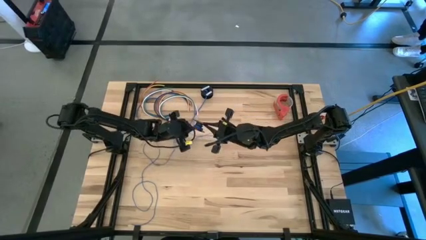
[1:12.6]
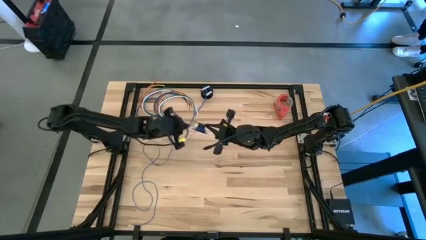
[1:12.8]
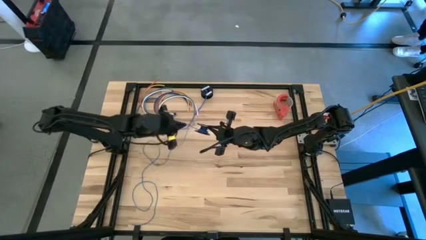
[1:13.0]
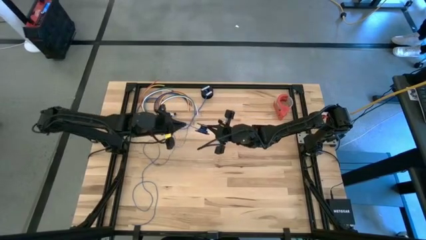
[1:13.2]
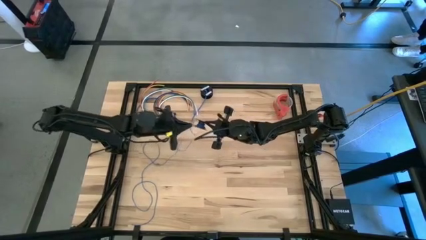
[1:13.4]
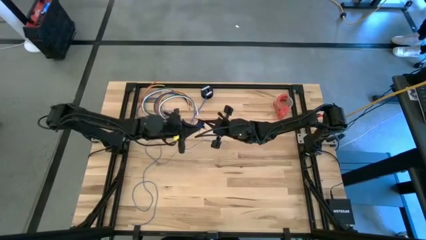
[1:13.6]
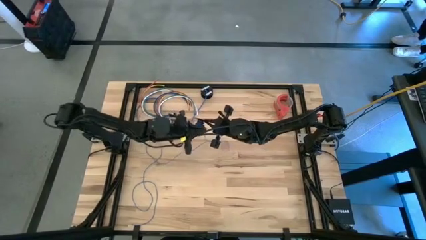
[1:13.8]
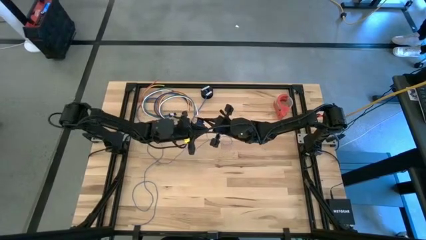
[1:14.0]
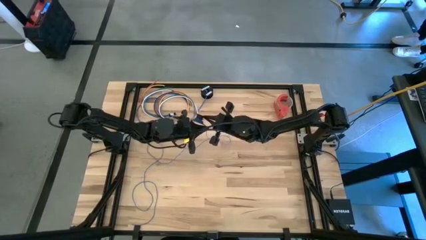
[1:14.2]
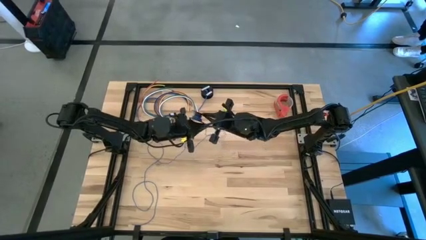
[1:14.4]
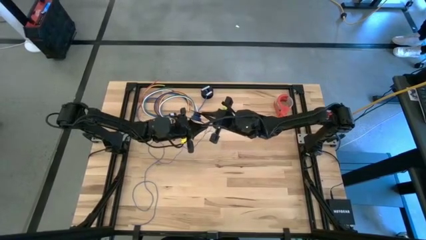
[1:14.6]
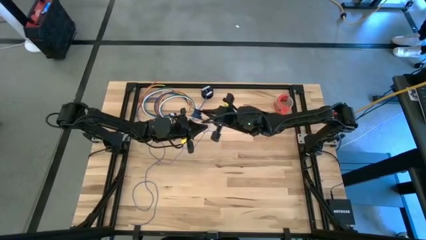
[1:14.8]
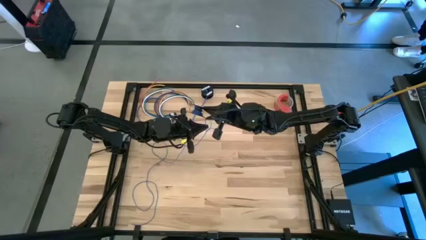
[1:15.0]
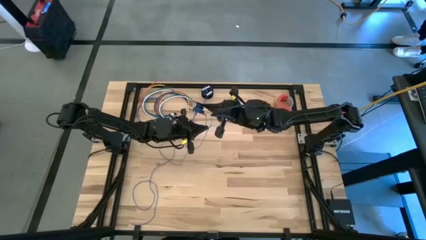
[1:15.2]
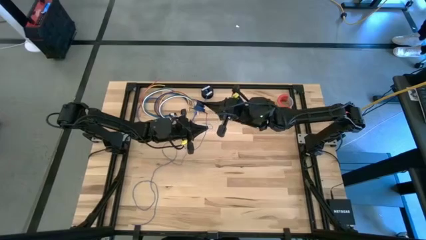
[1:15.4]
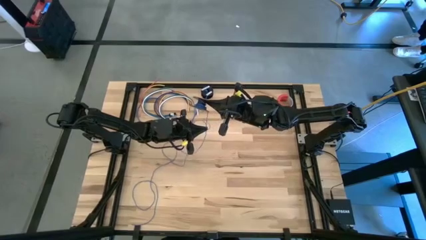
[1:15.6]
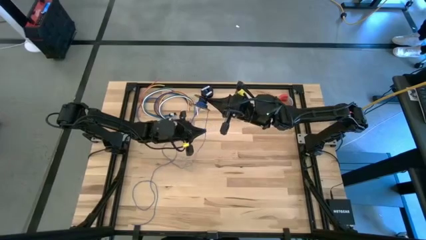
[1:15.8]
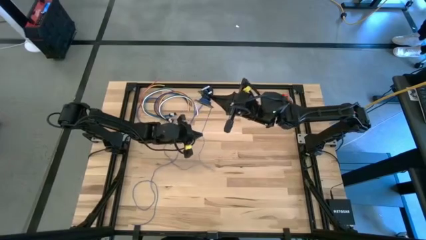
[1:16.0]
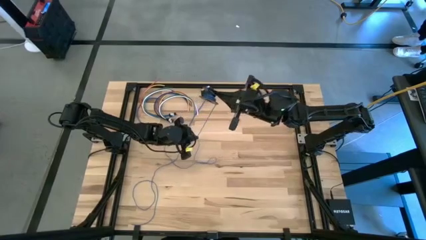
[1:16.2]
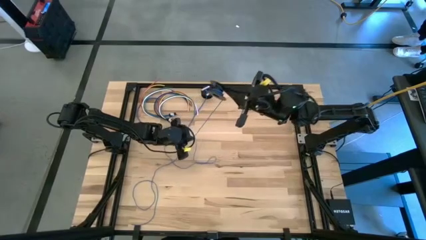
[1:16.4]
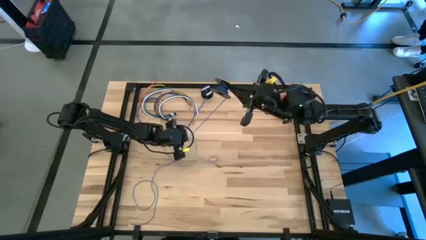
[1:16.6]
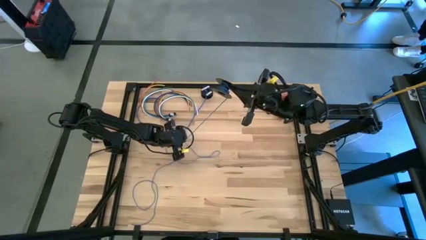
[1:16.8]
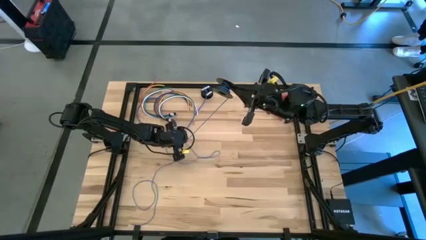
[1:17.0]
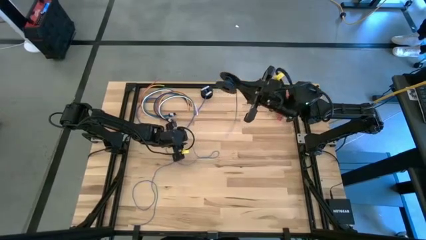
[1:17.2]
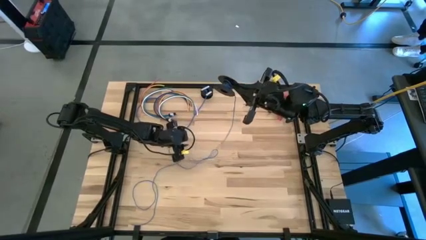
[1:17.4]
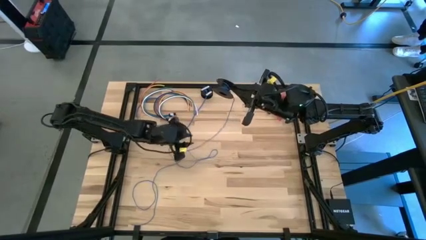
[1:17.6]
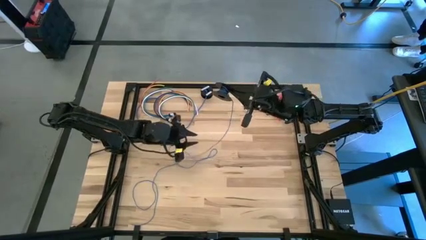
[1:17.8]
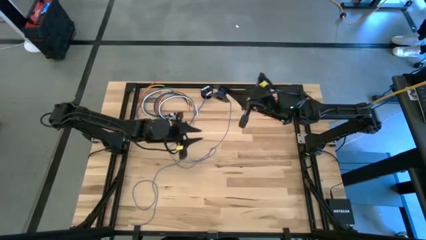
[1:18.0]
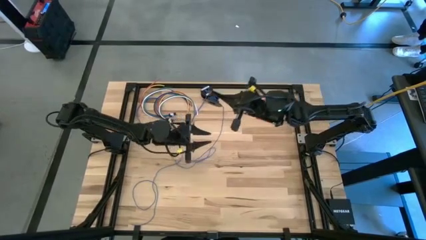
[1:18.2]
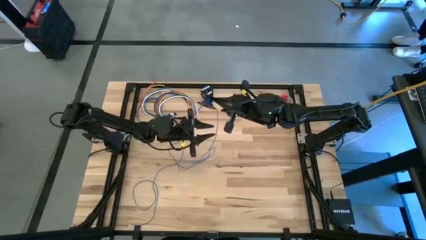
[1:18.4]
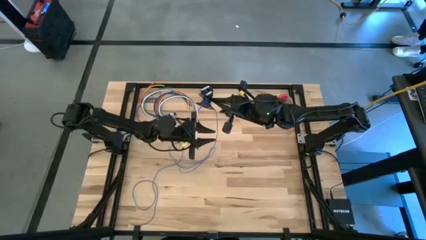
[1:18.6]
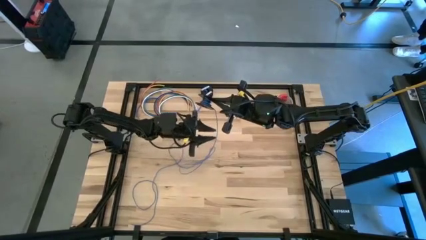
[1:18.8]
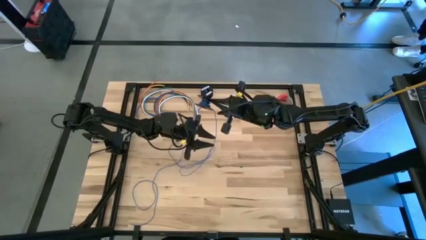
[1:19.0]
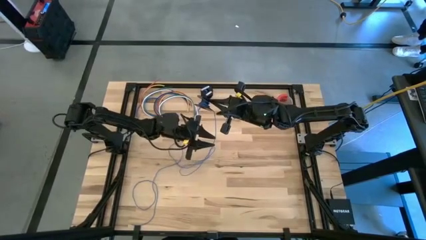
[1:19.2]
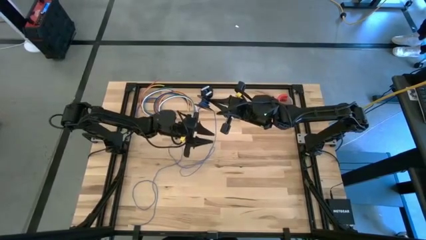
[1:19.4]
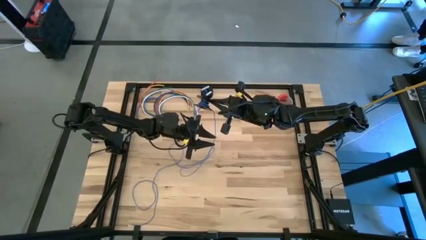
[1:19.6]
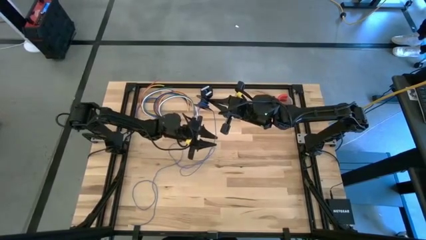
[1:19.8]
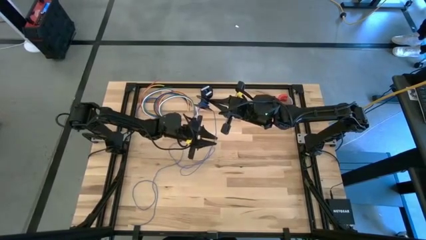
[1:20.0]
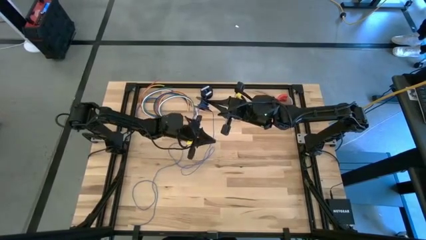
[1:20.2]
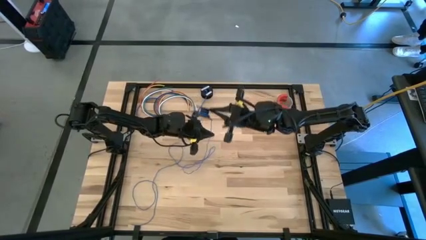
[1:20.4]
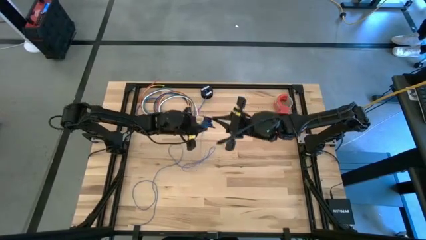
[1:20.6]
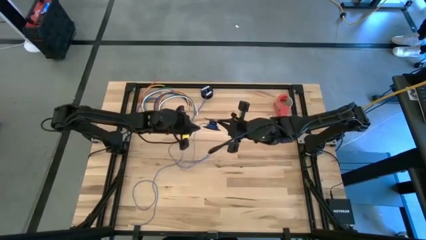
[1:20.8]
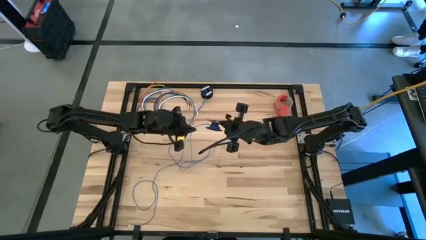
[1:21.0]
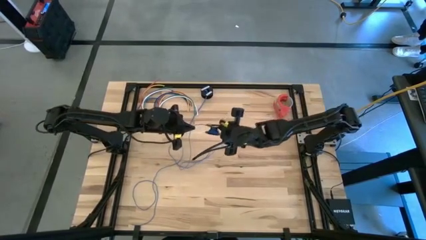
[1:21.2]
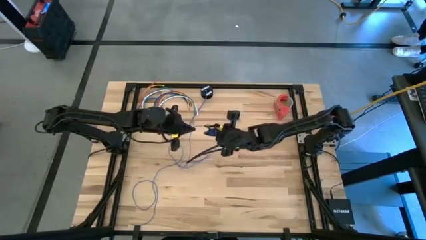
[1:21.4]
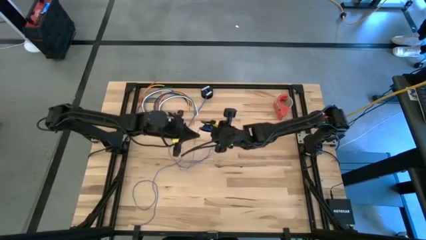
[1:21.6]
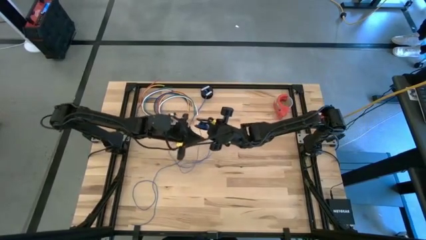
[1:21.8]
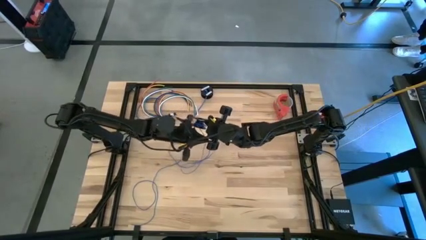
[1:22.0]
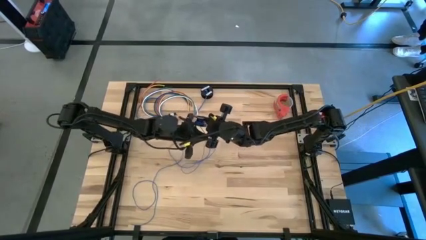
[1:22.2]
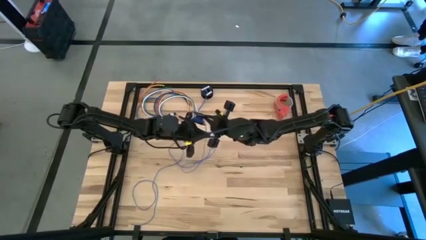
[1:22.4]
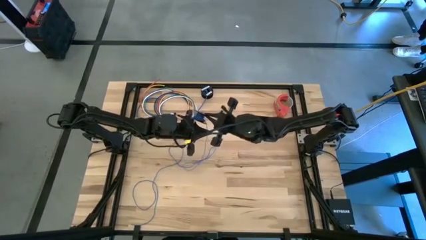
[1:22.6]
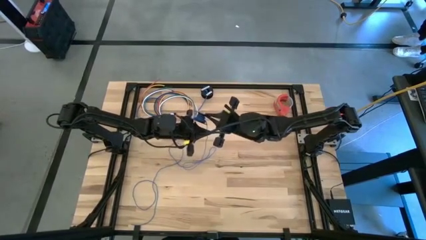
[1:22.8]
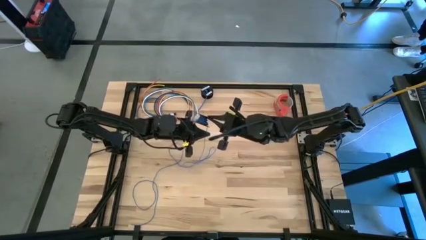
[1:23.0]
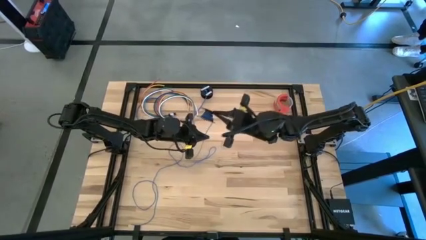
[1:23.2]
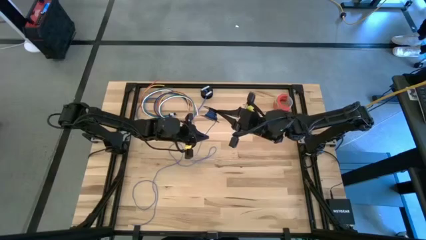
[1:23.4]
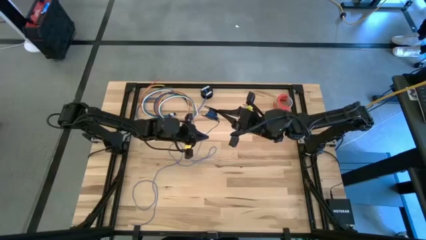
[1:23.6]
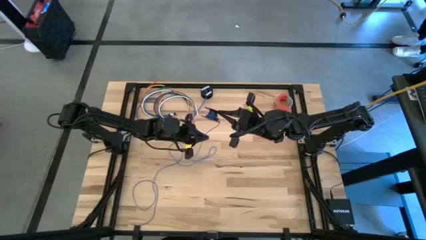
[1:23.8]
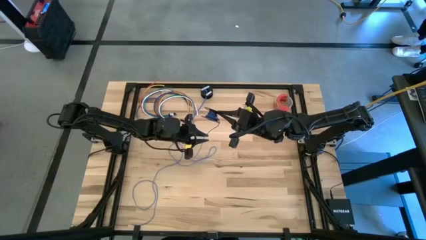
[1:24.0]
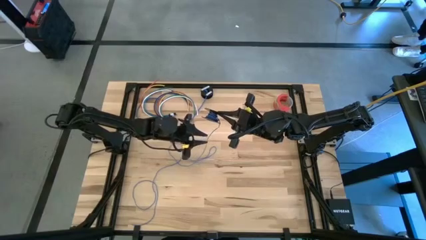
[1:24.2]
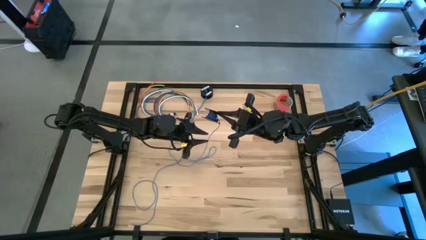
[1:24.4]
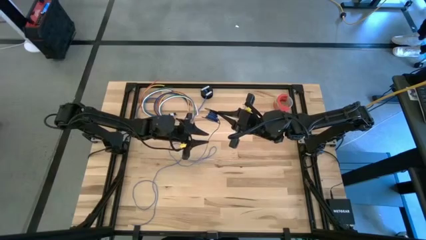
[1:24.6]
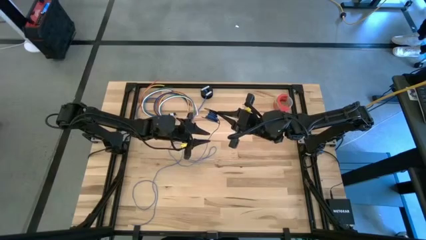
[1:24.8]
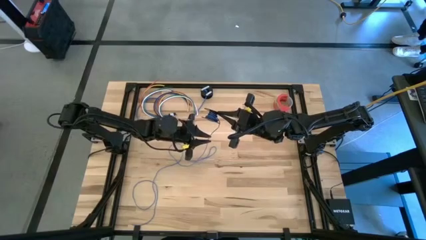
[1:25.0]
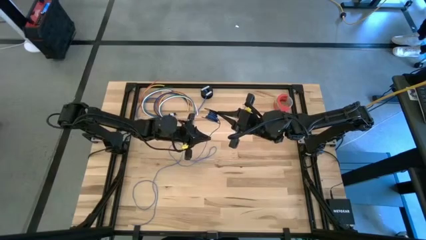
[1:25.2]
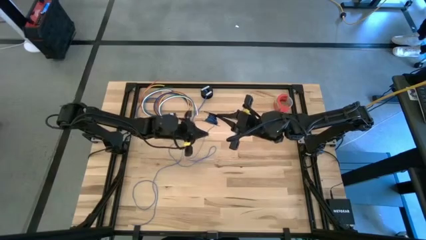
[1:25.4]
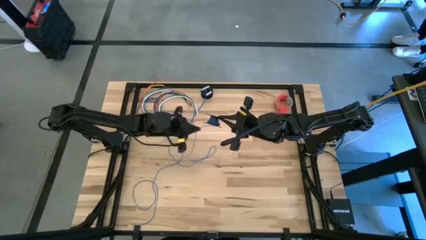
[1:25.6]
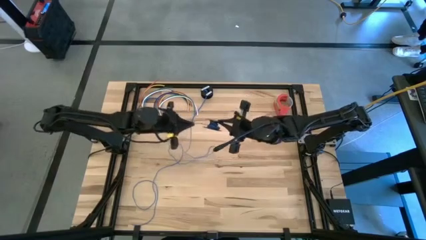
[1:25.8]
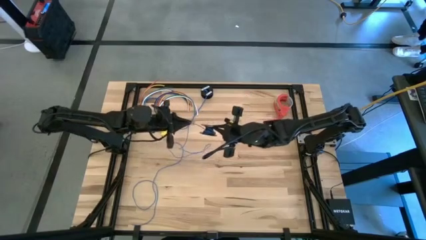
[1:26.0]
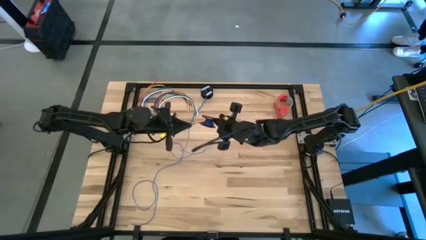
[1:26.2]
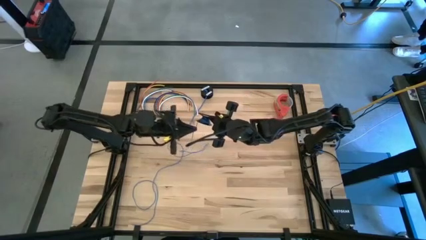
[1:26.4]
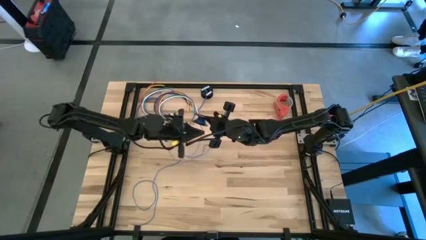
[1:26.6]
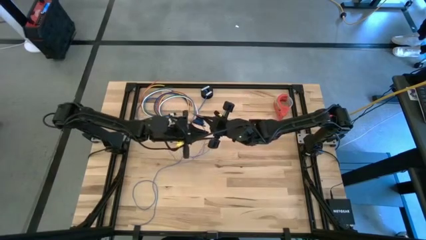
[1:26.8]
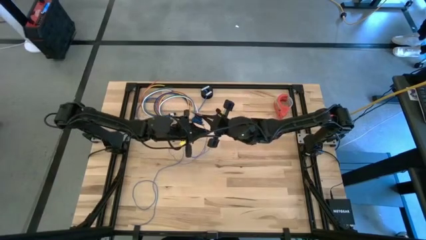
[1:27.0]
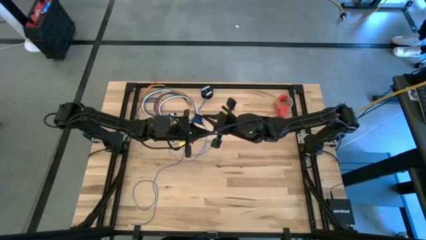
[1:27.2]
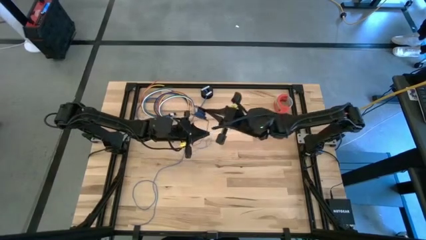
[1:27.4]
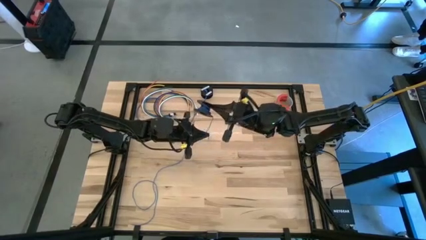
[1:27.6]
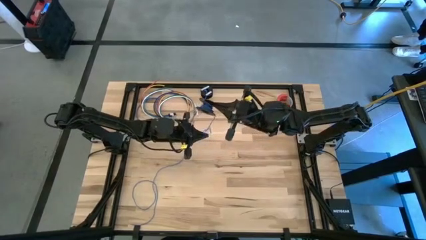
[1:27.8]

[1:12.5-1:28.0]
Task: Coil cords
Coil the blue wire onto the spool

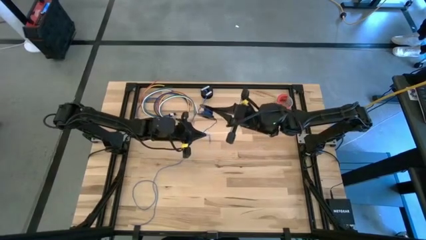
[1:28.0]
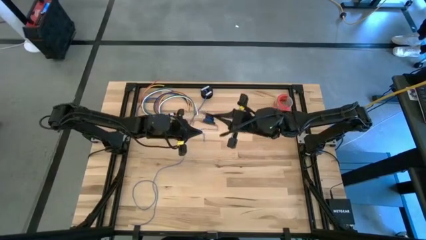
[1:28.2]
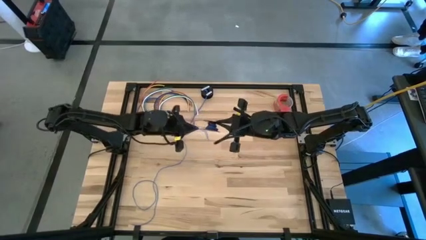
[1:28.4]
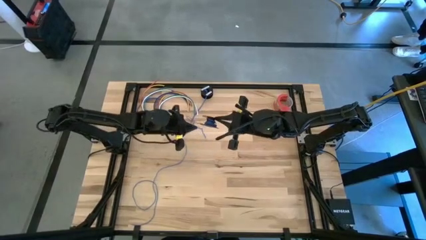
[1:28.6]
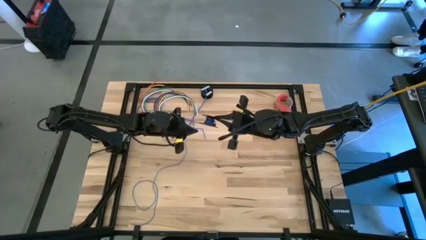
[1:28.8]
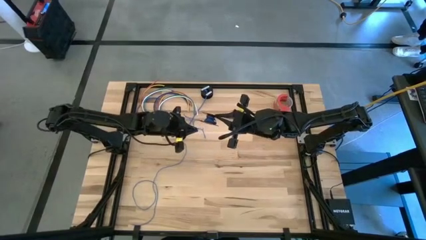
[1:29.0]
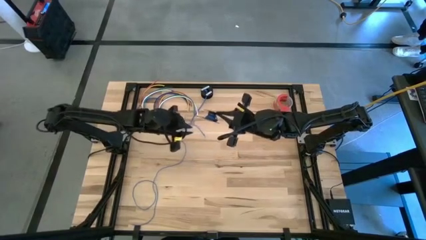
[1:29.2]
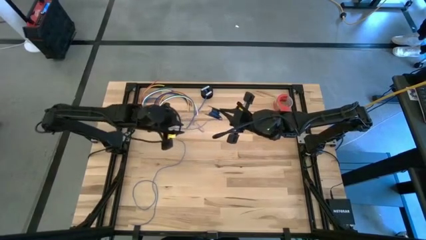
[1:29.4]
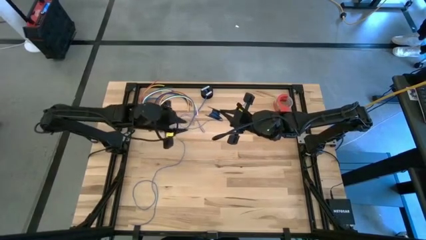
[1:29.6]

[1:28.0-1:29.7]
Coil the blue wire onto the spool
